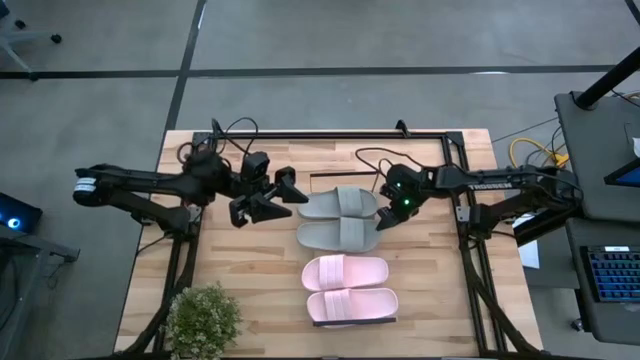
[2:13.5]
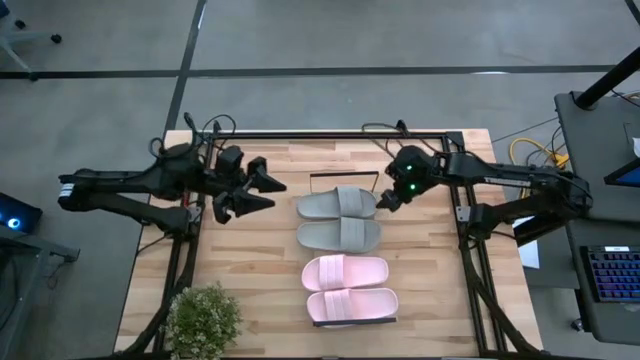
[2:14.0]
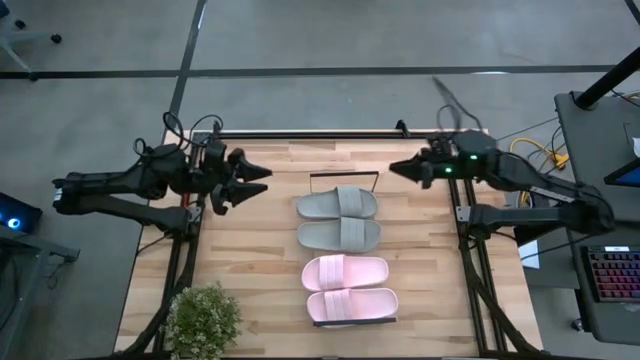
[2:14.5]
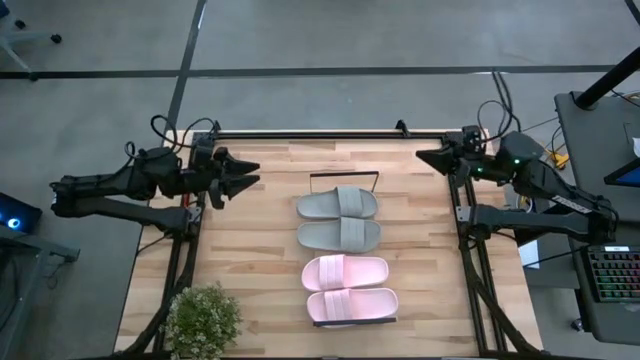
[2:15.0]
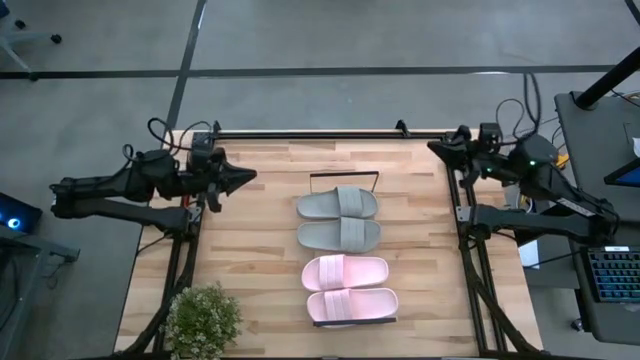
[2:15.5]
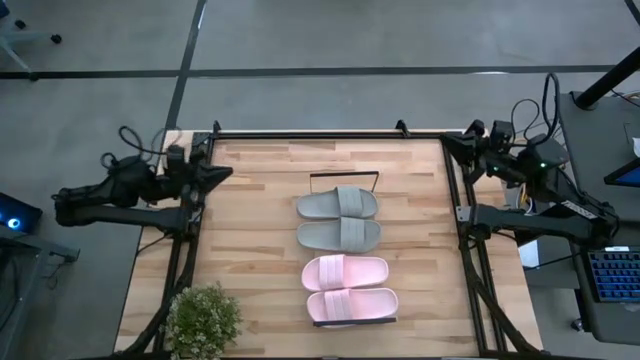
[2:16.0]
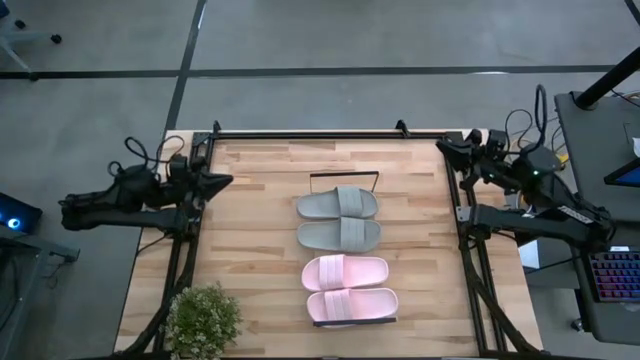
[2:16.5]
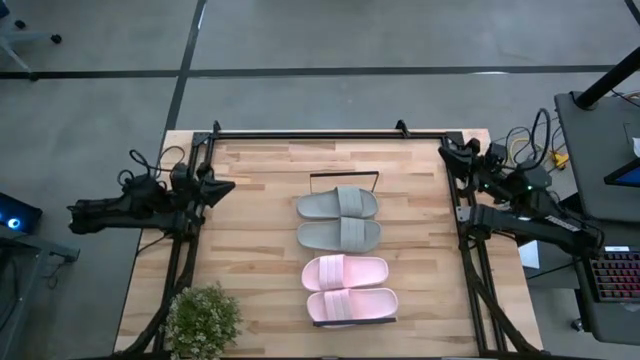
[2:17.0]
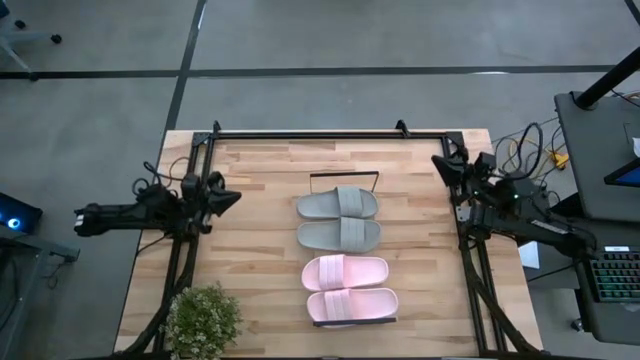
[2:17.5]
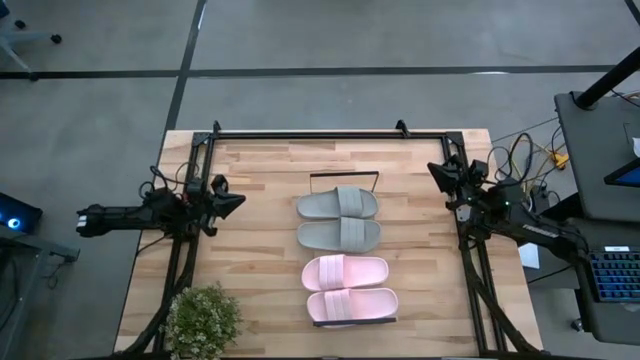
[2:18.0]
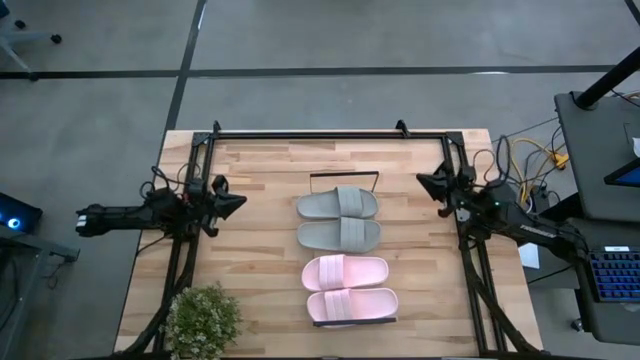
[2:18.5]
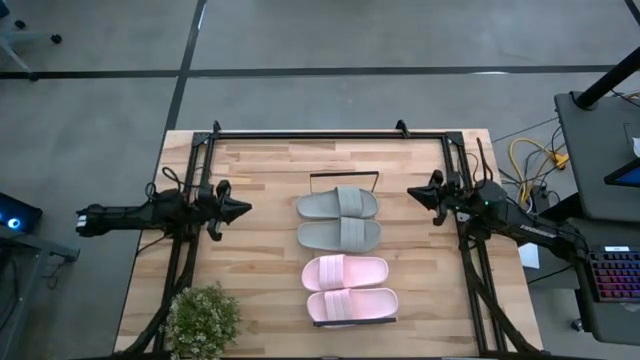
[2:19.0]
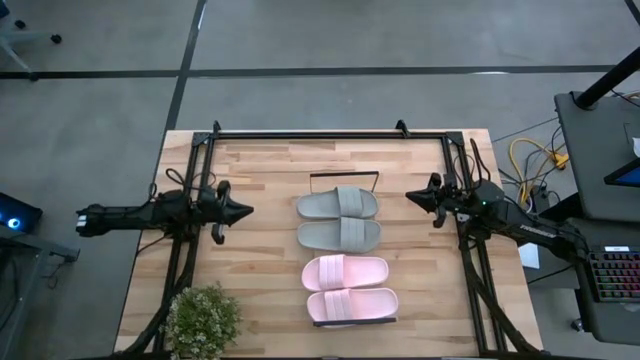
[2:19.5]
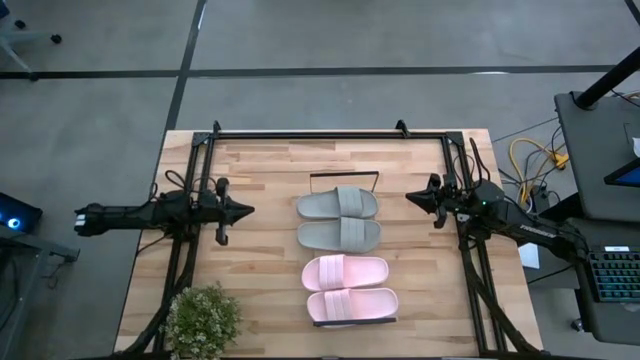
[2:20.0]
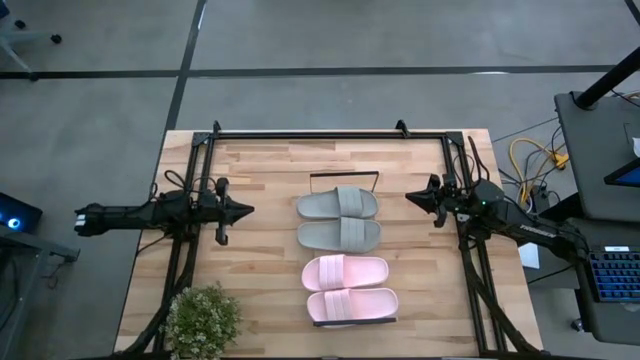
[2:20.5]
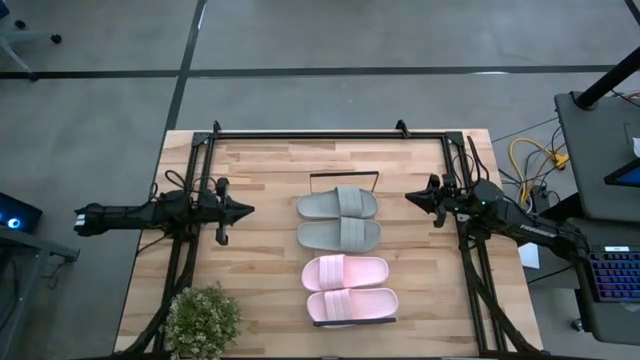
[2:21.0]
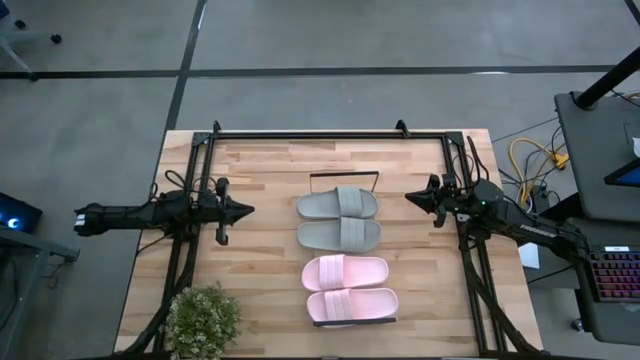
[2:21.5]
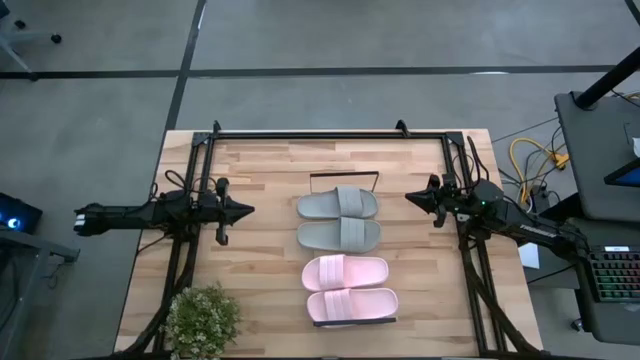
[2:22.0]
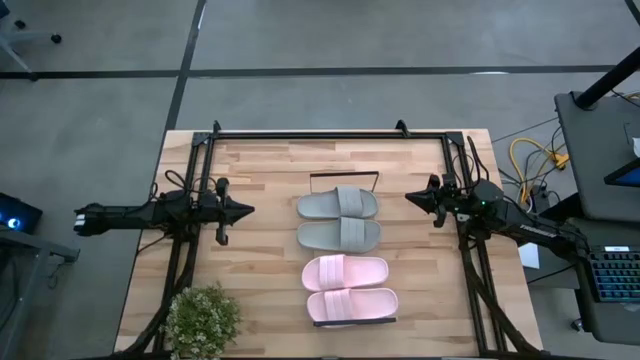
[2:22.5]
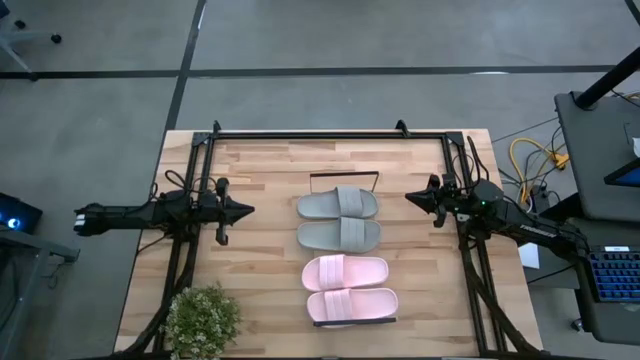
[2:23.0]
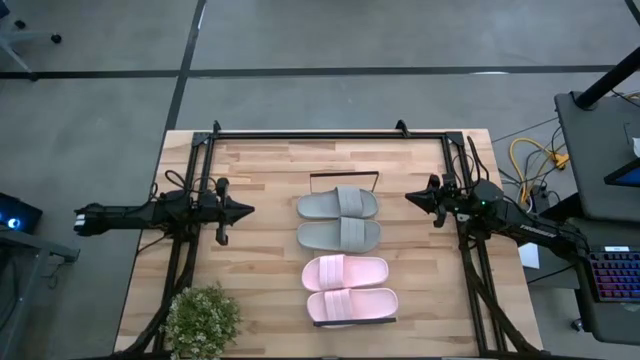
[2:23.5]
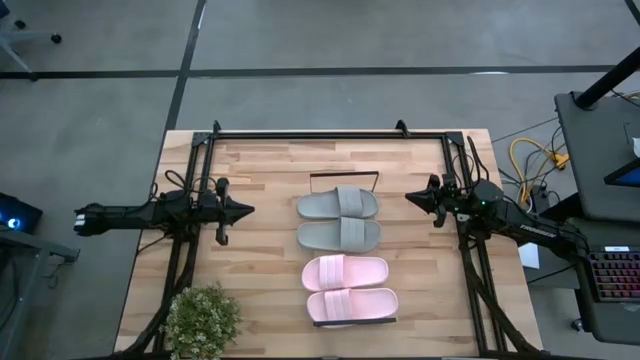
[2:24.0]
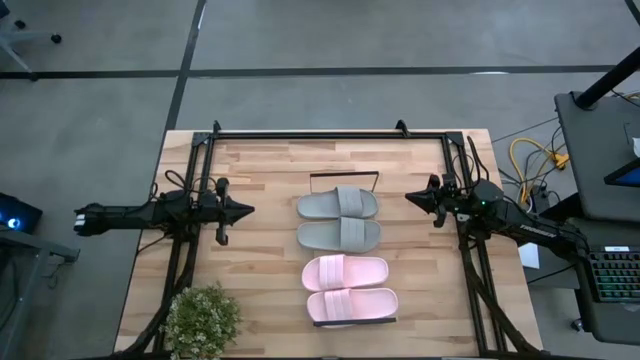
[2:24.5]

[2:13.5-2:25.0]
Task: Pick and place slides into the shelf
Return to Home Position

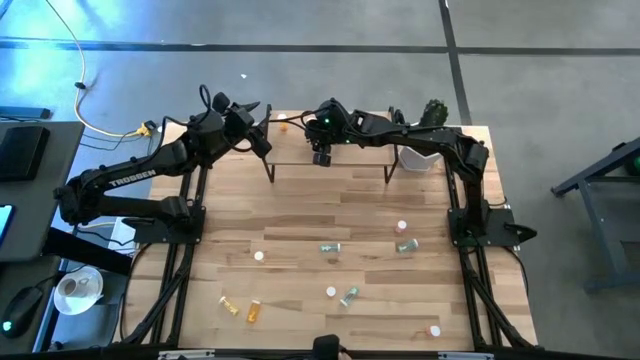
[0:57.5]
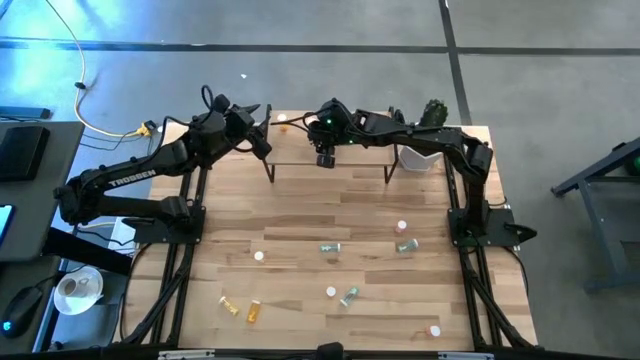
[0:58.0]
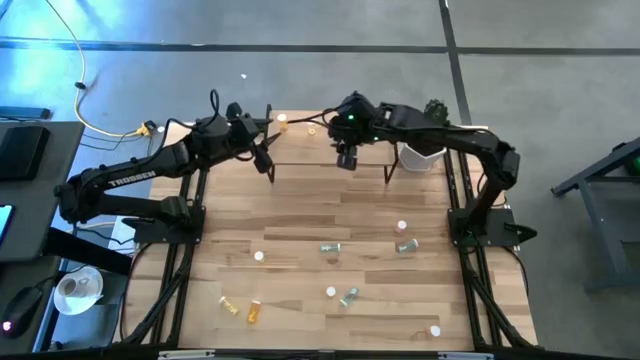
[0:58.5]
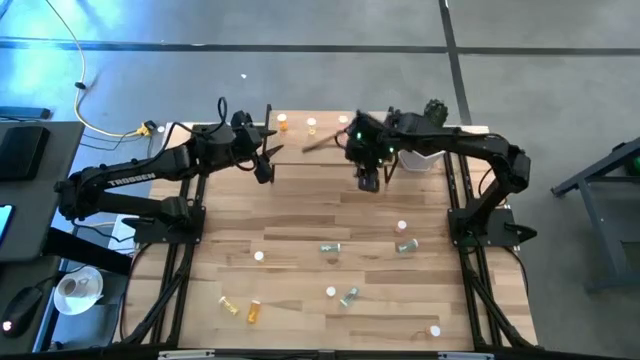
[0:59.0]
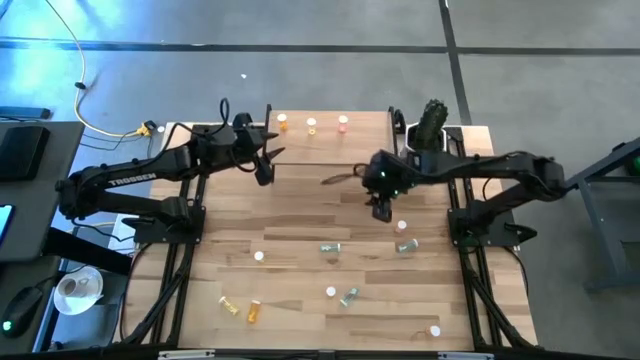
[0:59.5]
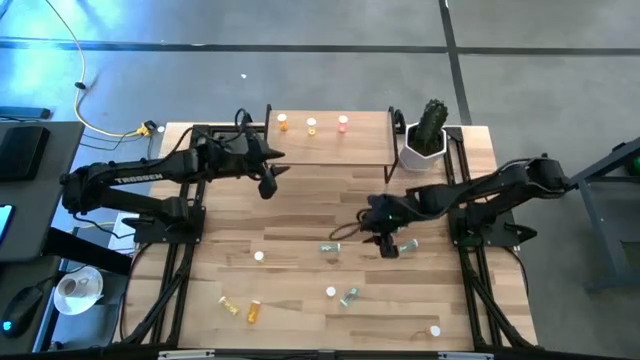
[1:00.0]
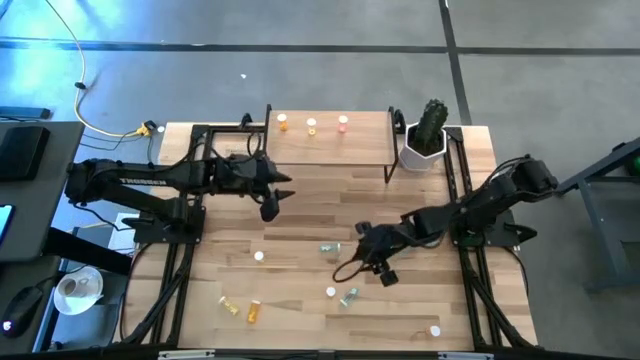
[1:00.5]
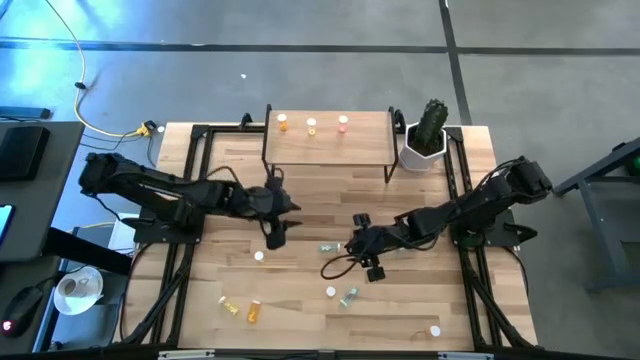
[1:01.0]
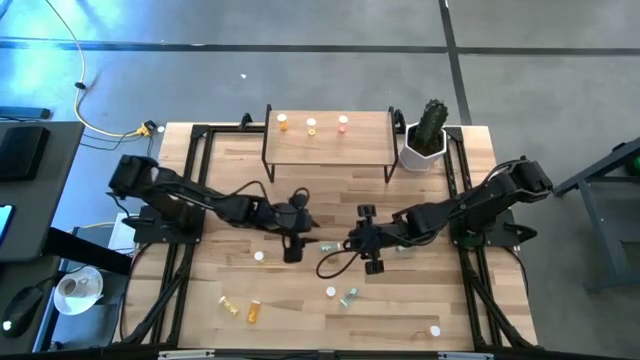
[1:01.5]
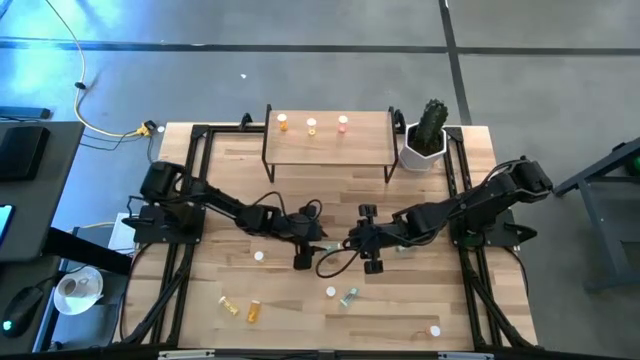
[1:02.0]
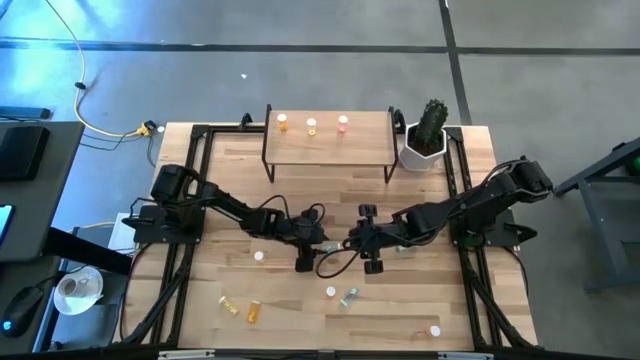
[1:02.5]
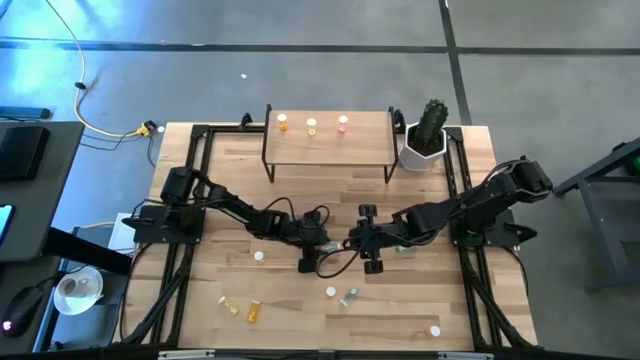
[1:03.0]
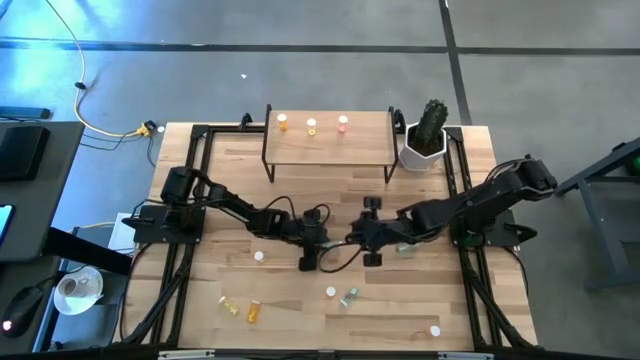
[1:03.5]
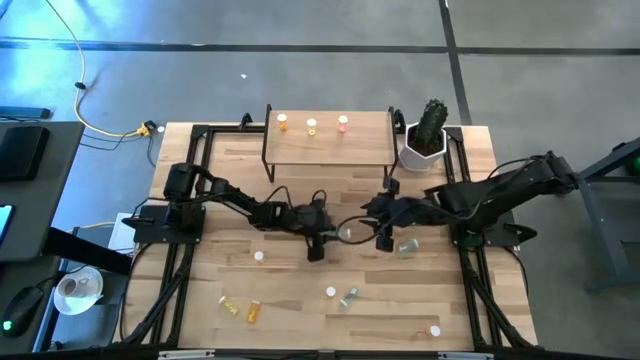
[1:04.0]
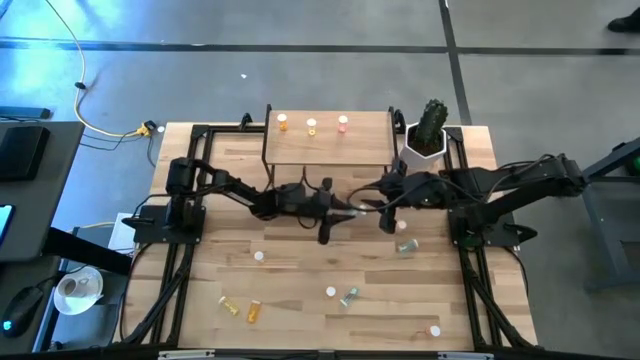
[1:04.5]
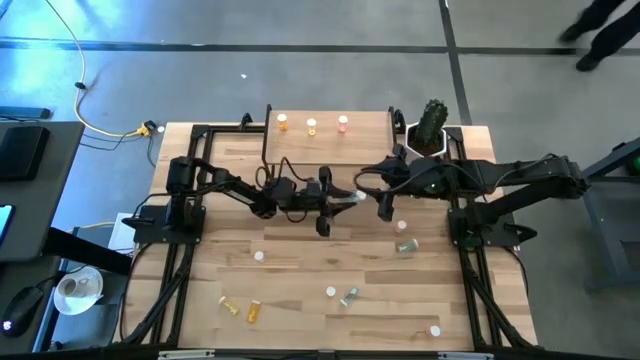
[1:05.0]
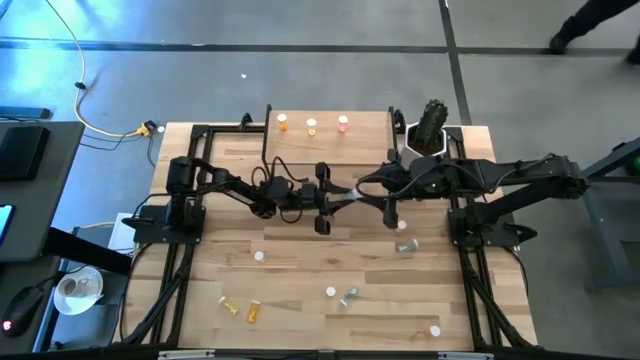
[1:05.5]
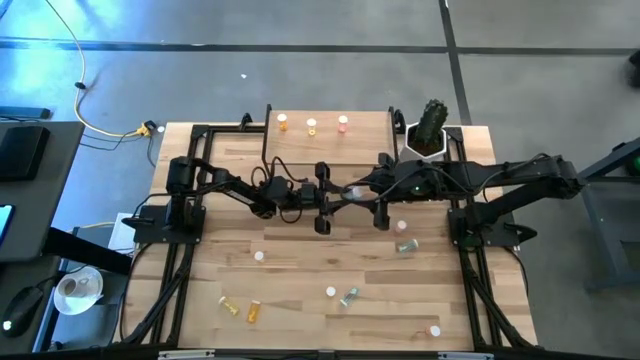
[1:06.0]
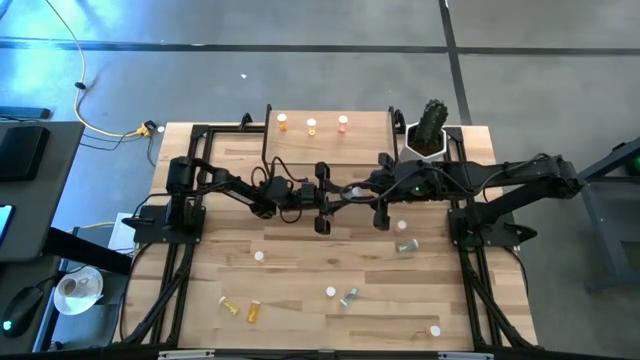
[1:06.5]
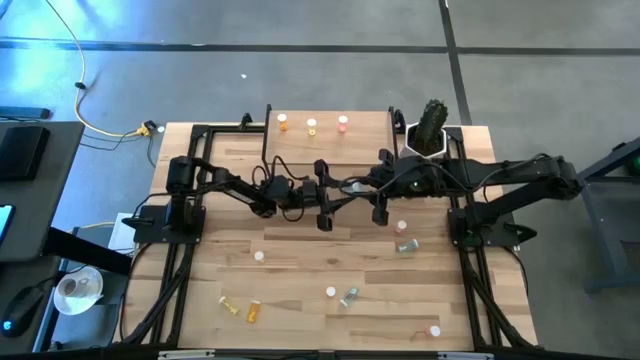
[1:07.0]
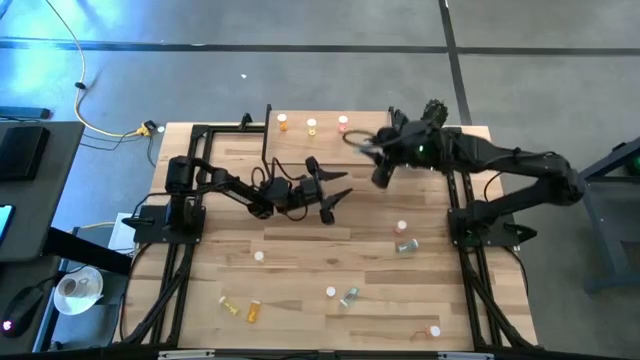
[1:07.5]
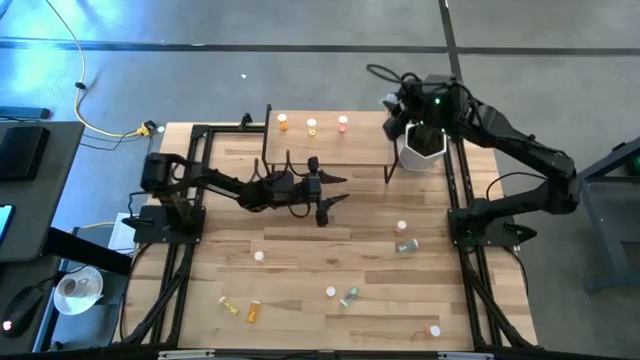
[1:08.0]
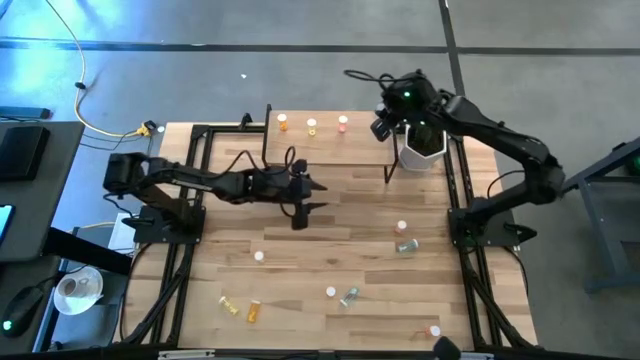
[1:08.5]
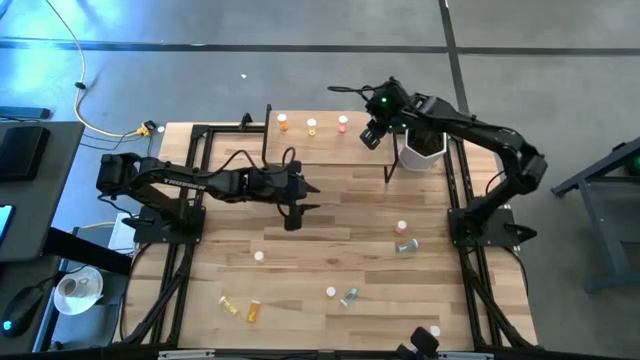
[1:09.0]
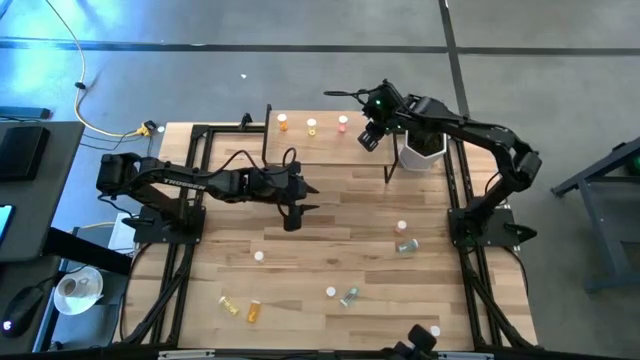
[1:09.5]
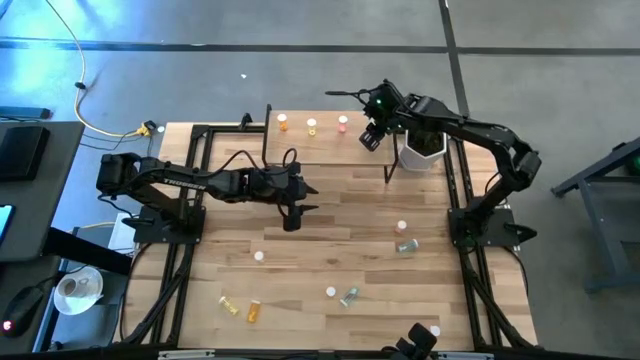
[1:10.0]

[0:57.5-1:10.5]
Task: Pick and place medicine bottles onto shelf by color
Put the top right blue pill bottle on the shelf
